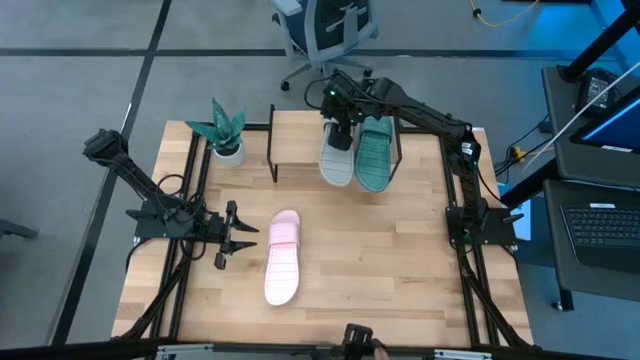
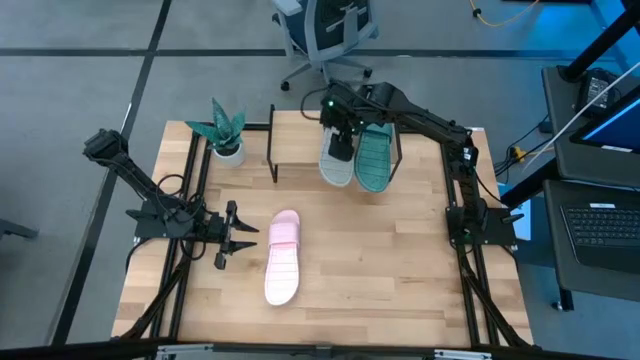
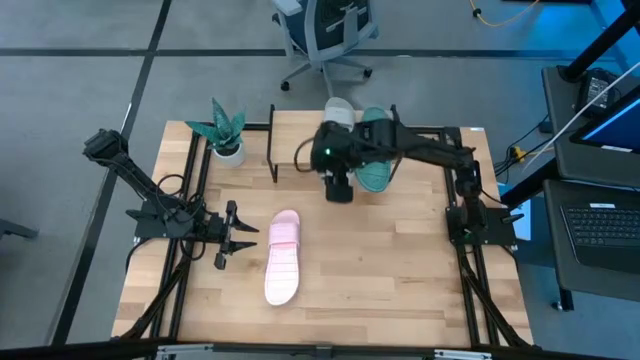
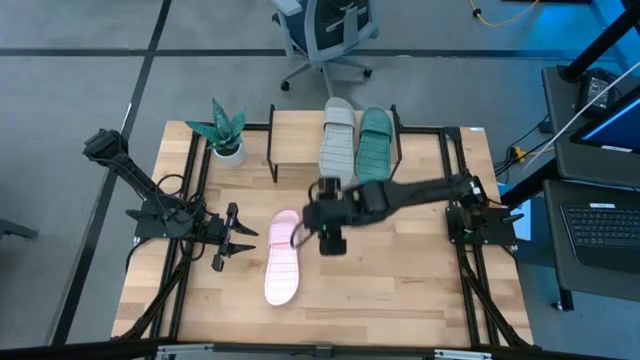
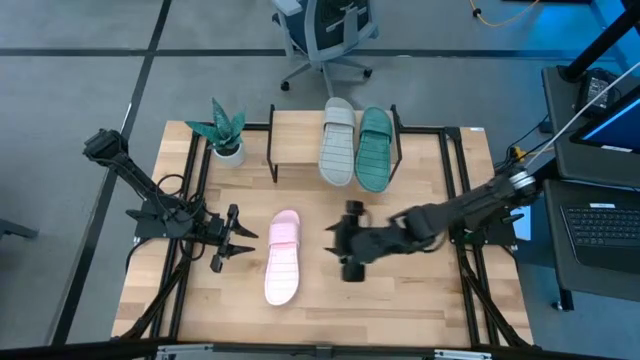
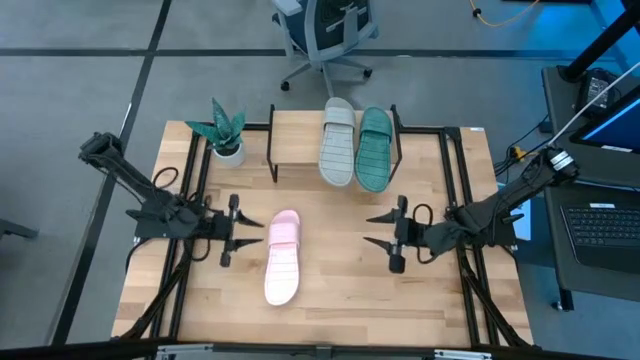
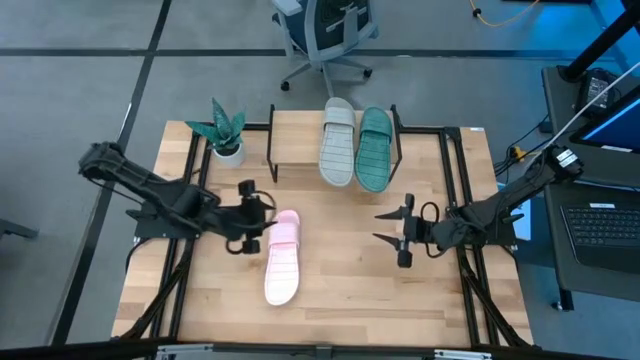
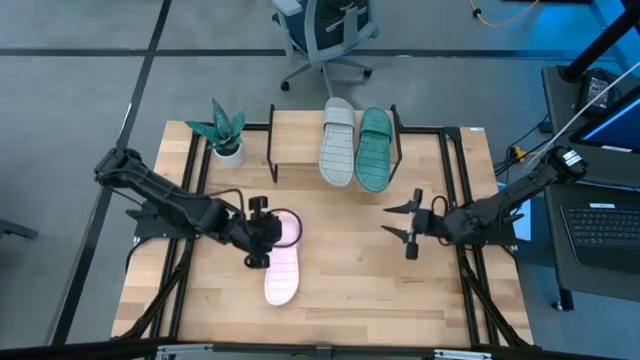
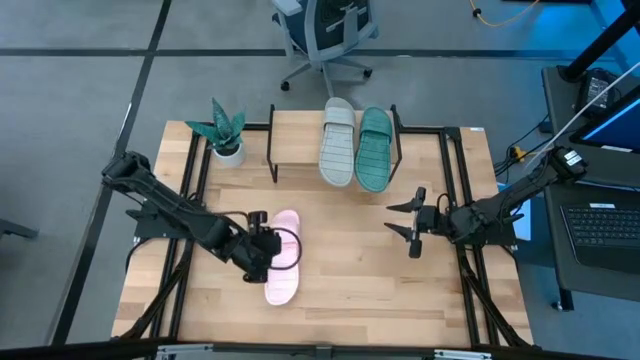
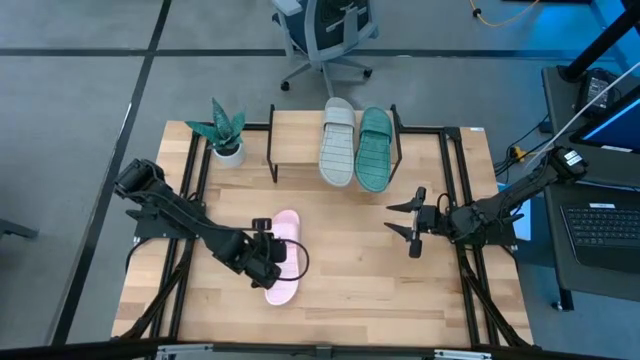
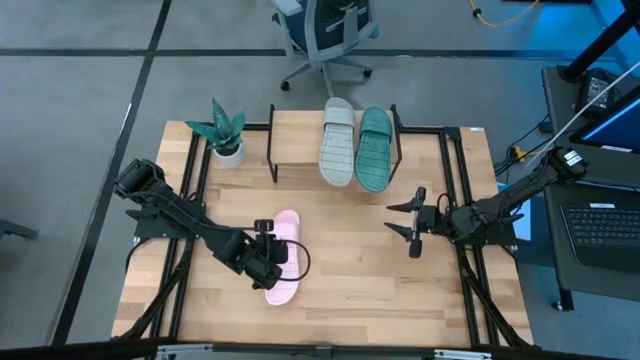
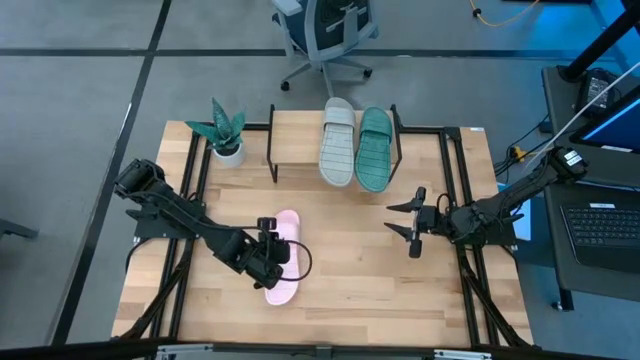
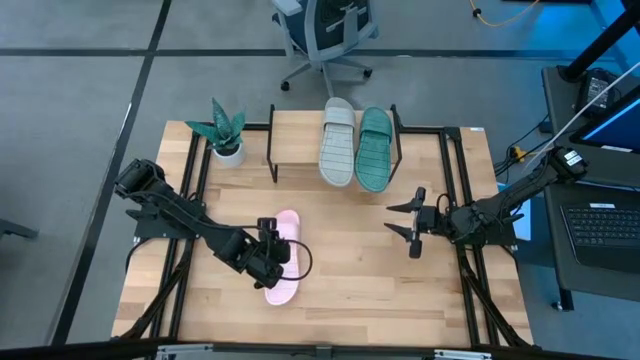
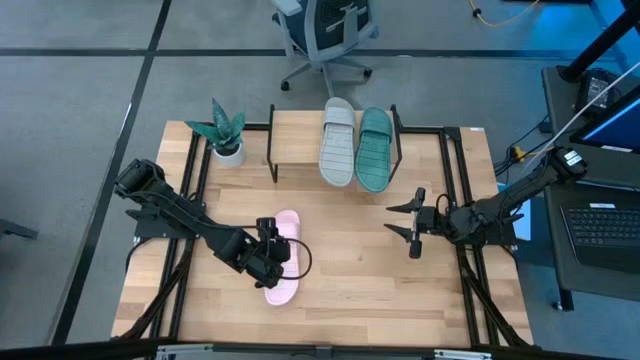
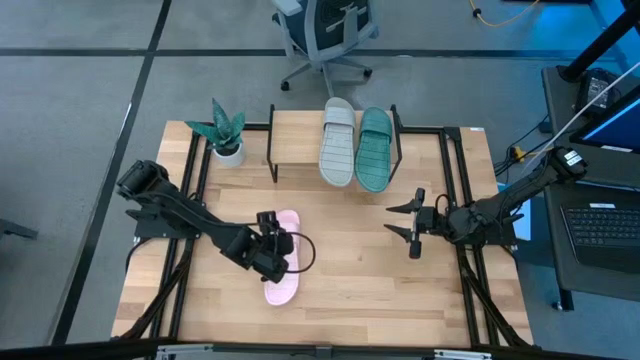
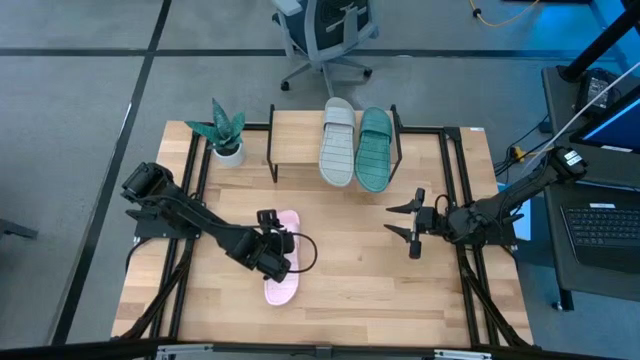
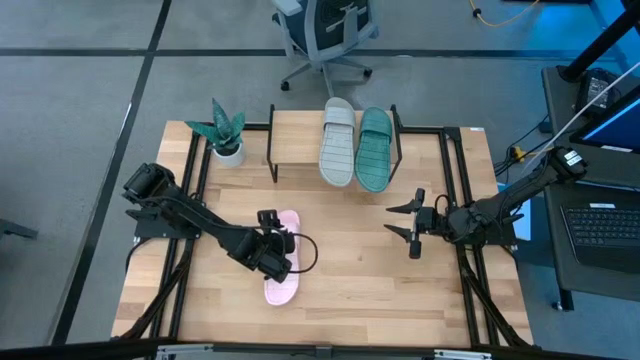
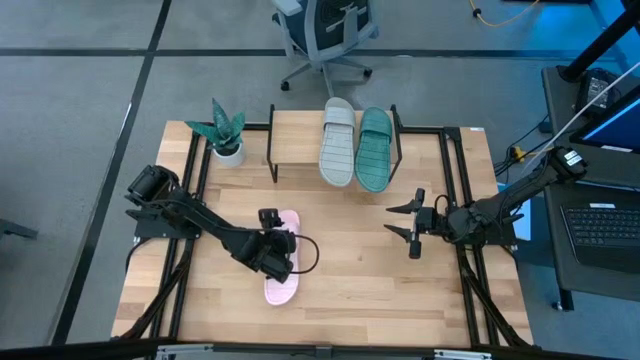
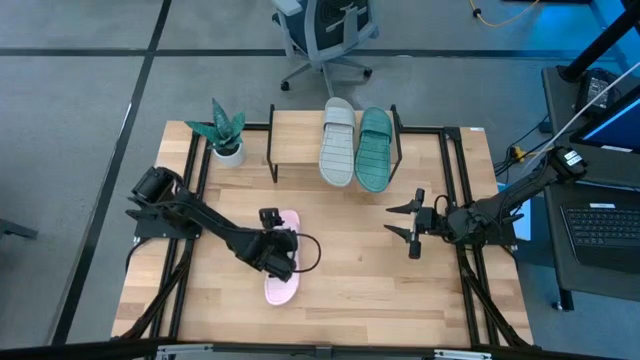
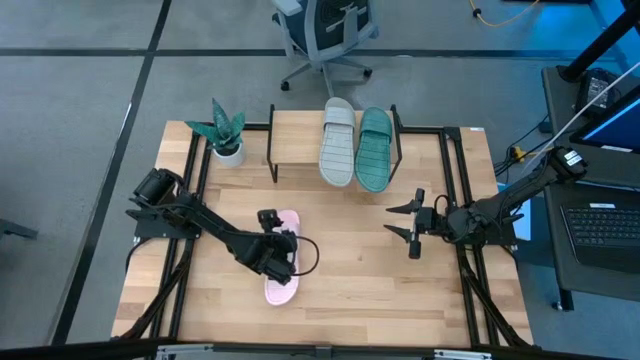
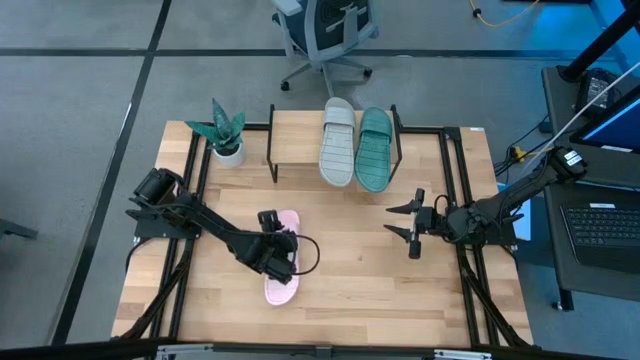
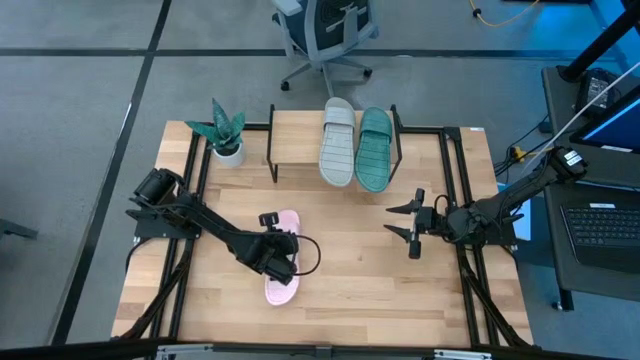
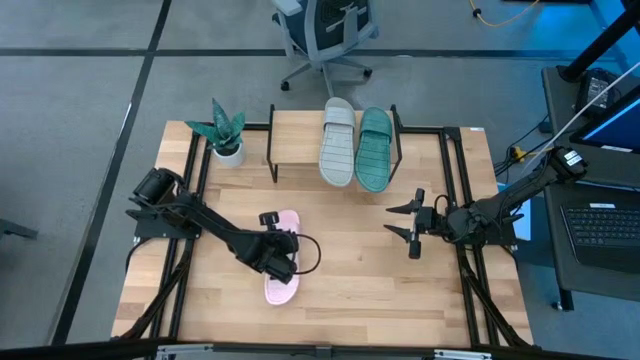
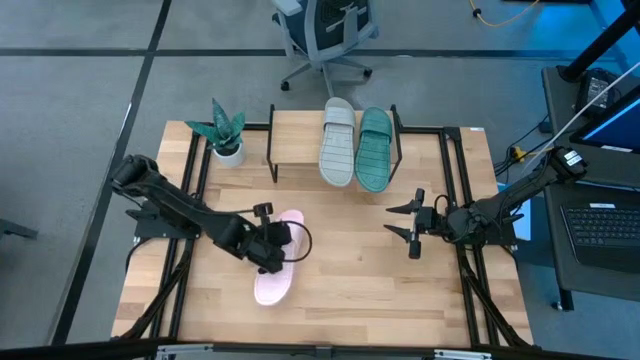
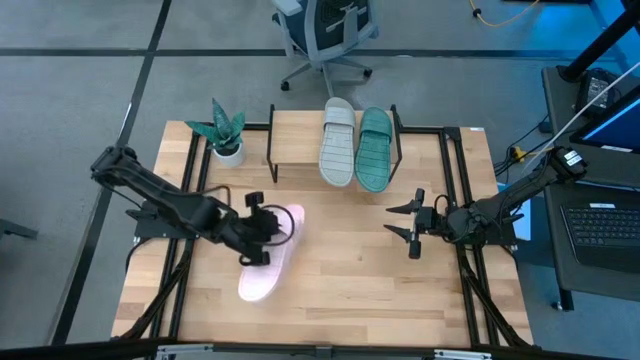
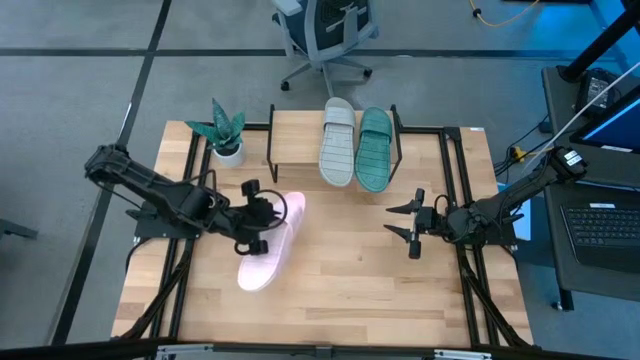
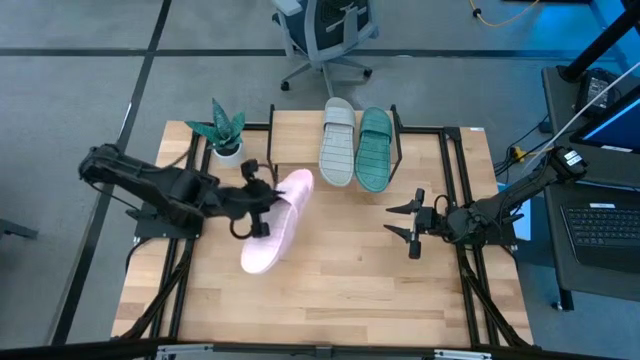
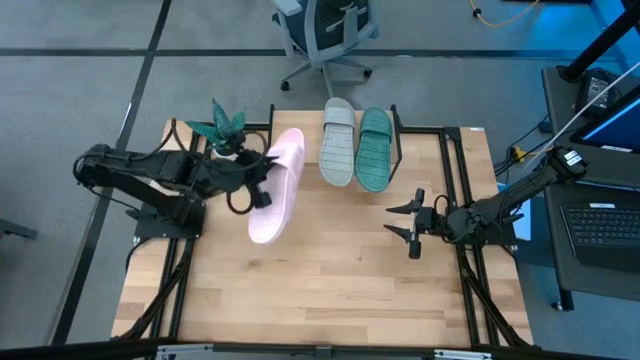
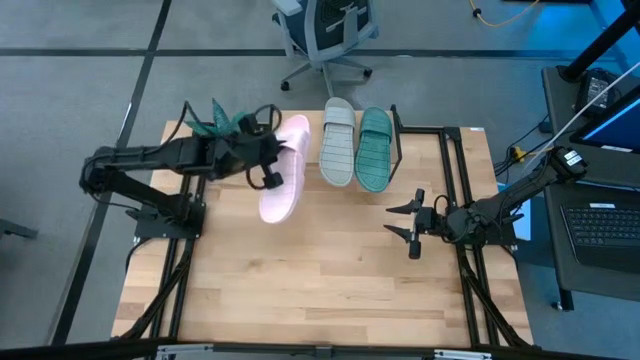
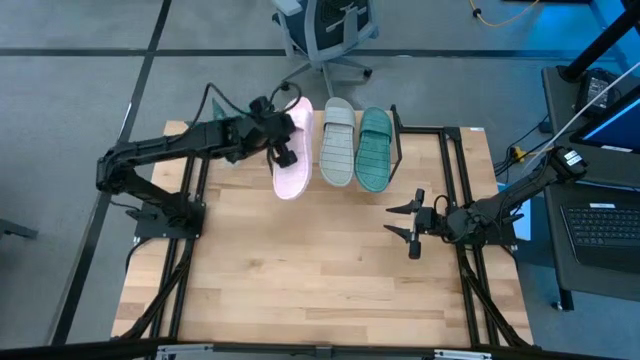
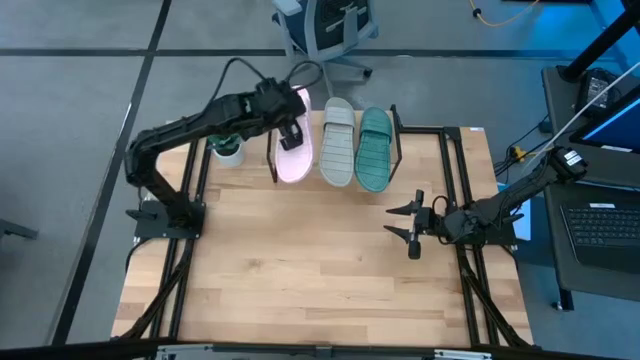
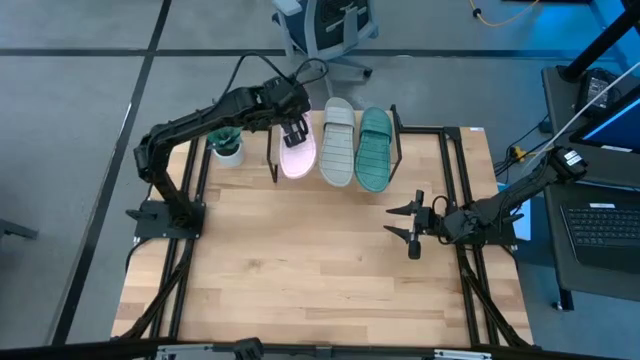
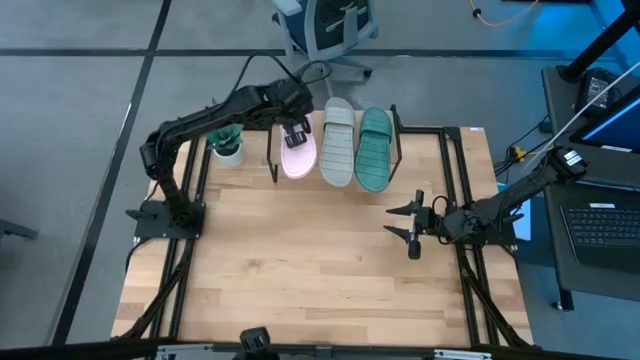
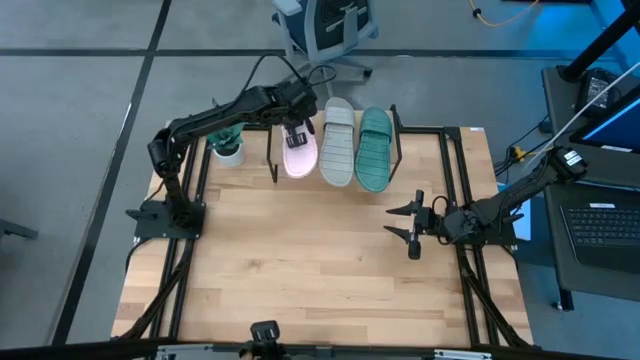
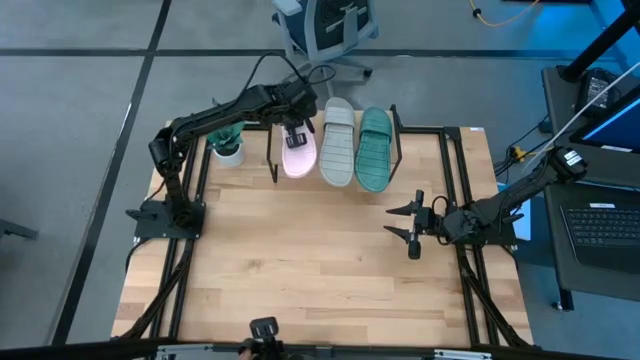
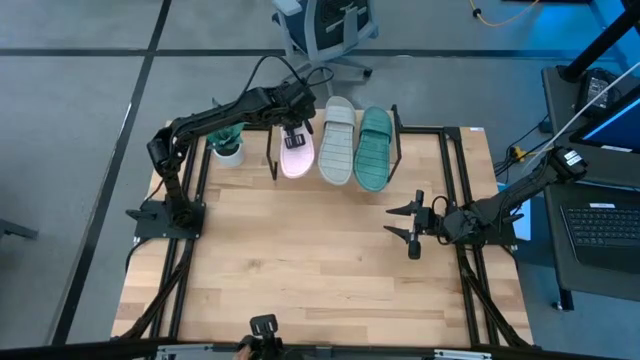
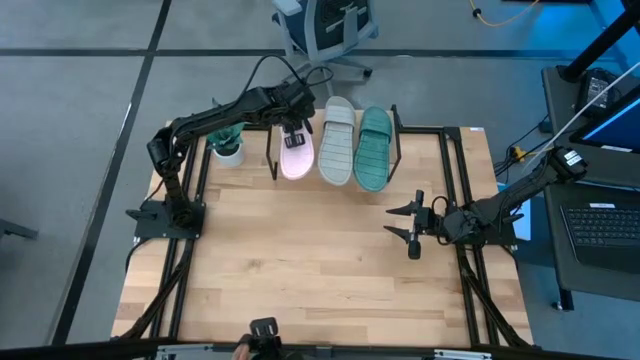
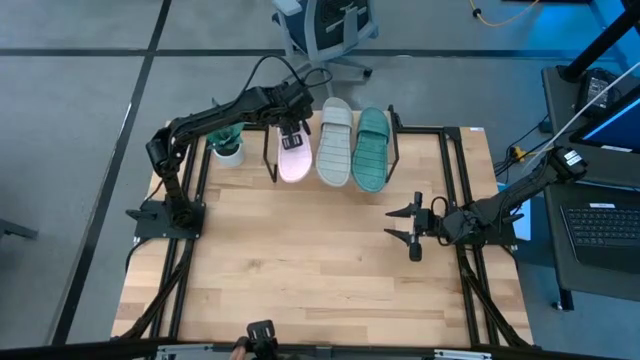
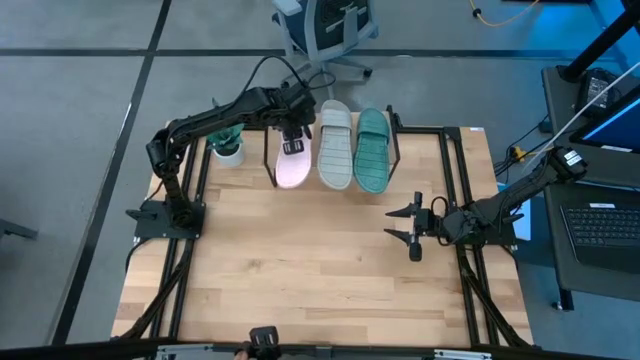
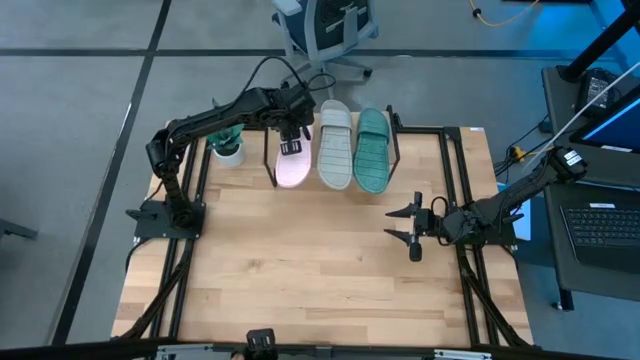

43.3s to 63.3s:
Task: Pick and place slides into the shelf
Put the pair of pink slides on the shelf
